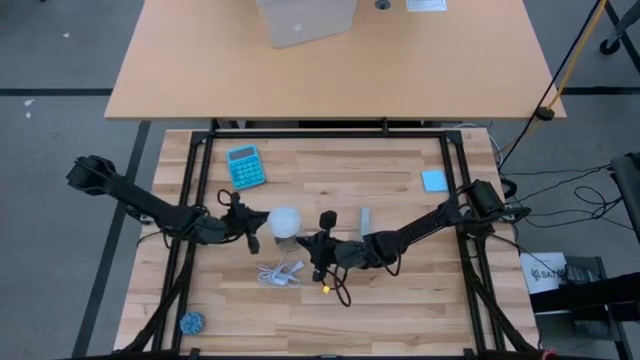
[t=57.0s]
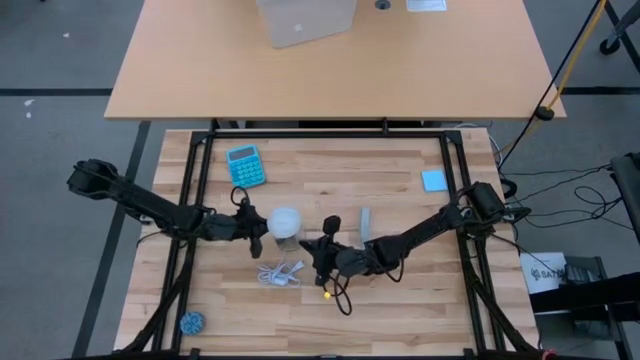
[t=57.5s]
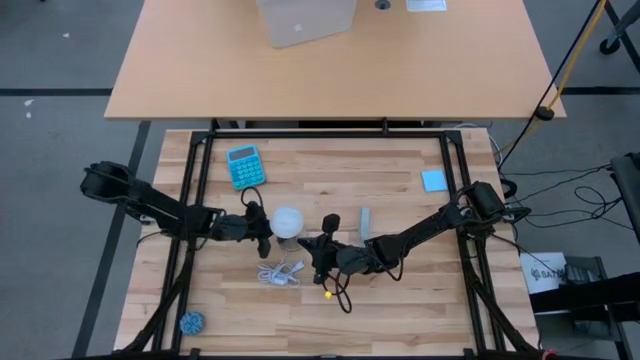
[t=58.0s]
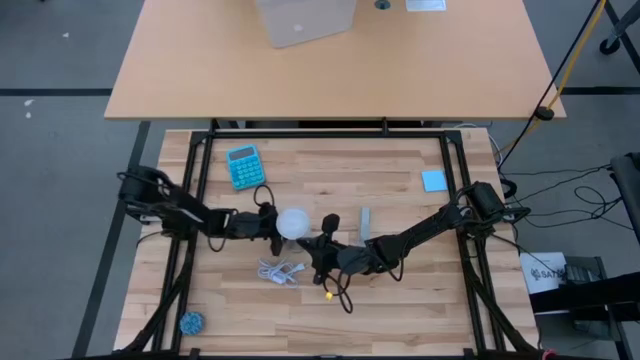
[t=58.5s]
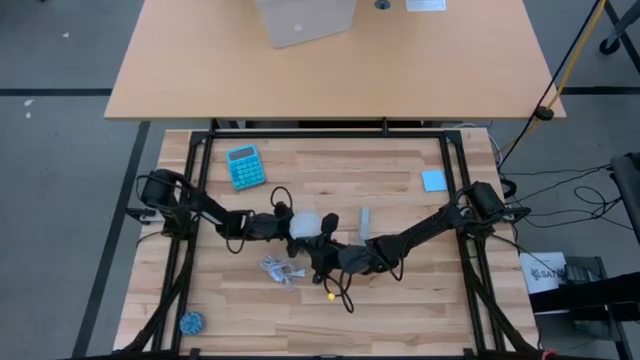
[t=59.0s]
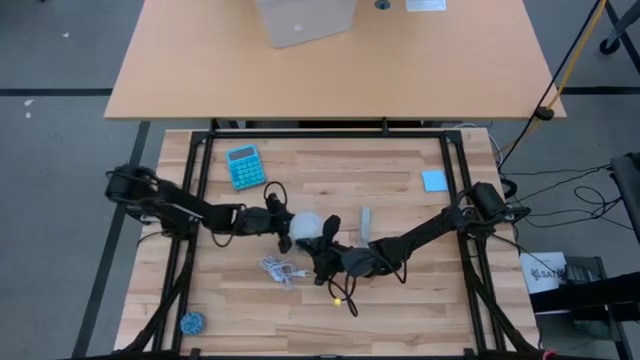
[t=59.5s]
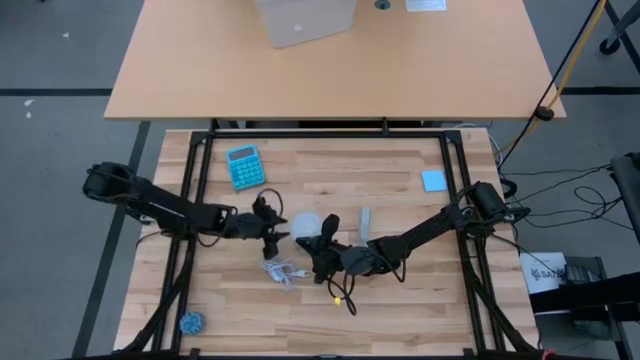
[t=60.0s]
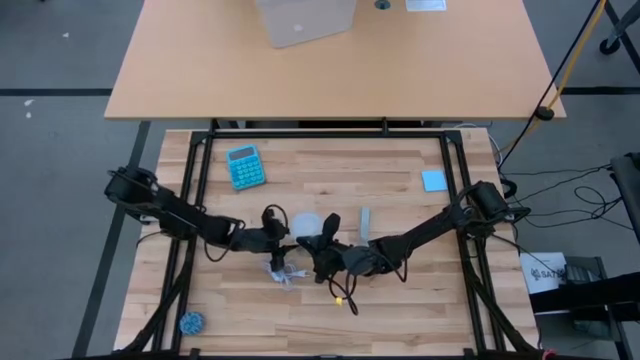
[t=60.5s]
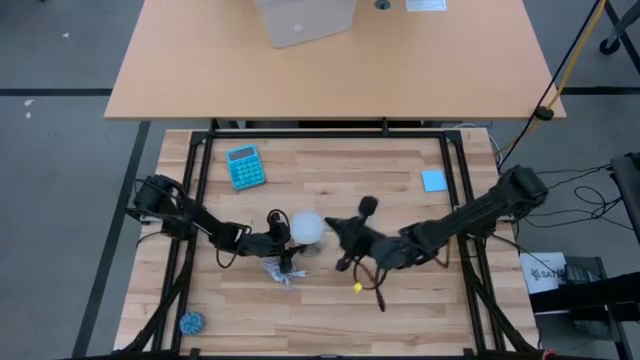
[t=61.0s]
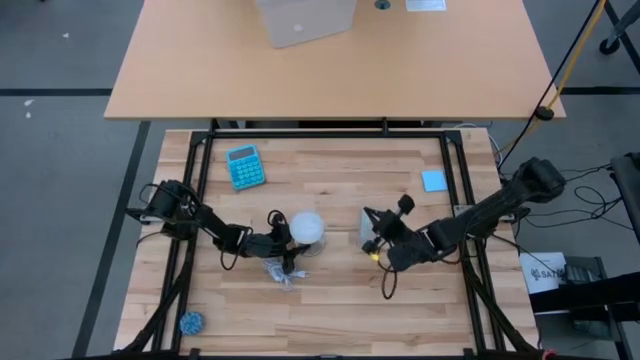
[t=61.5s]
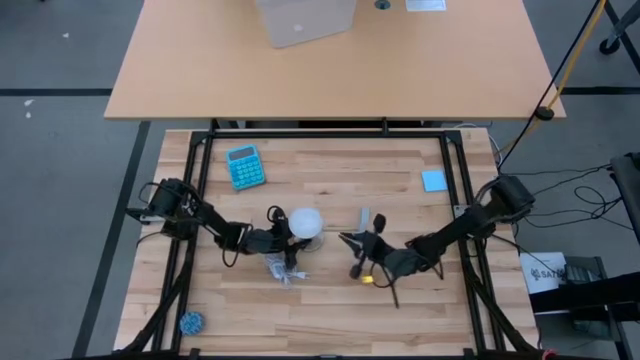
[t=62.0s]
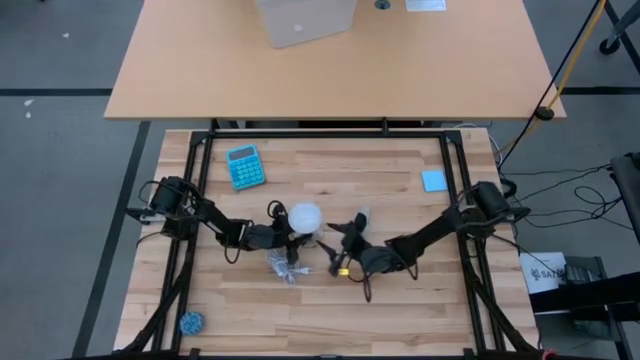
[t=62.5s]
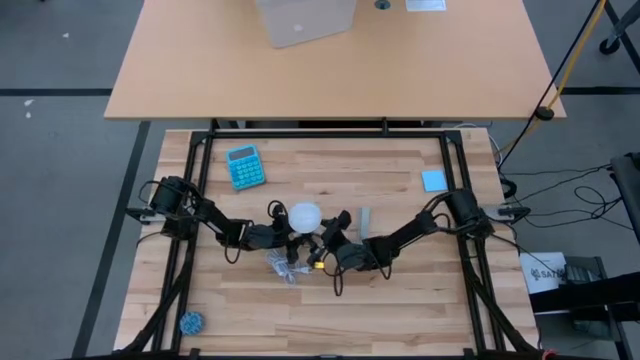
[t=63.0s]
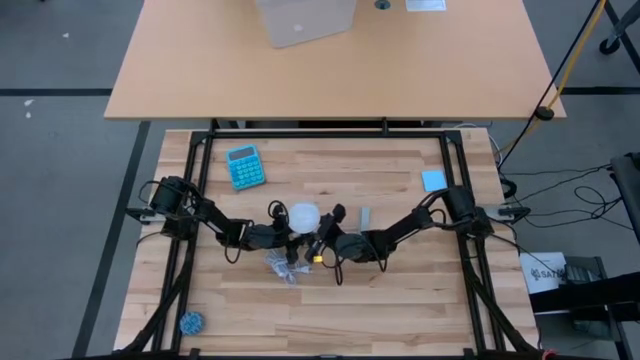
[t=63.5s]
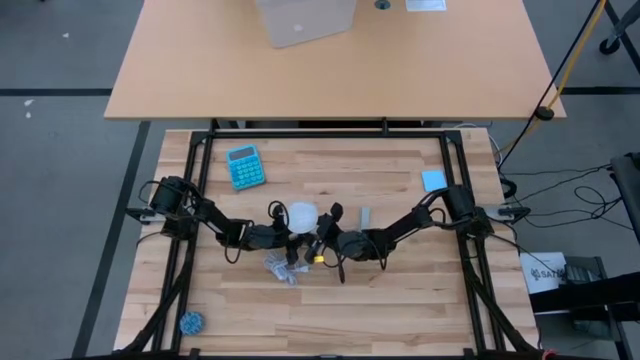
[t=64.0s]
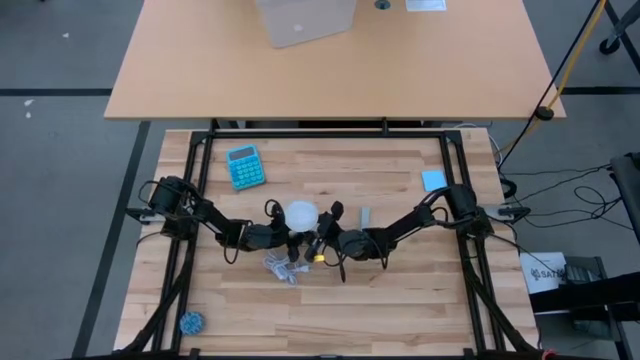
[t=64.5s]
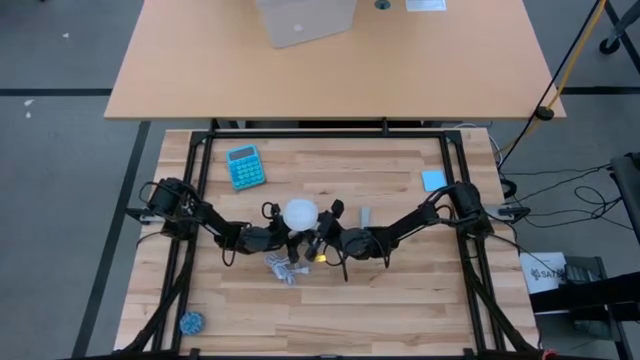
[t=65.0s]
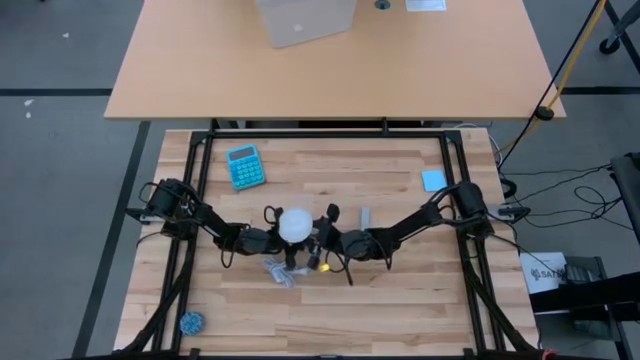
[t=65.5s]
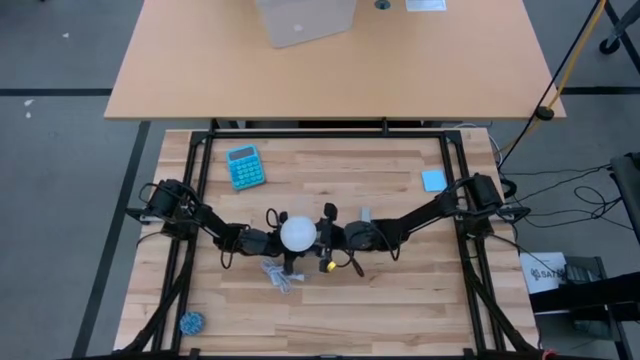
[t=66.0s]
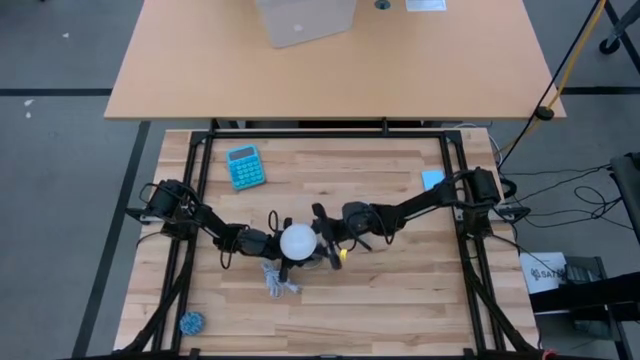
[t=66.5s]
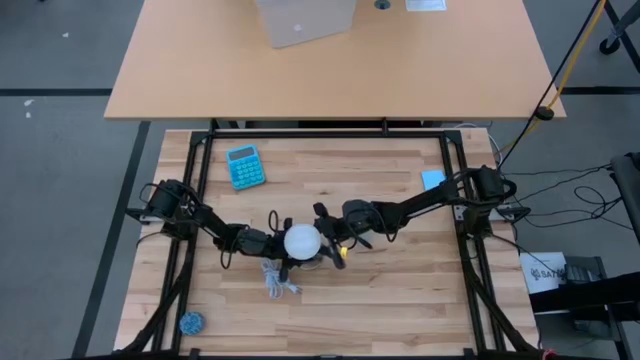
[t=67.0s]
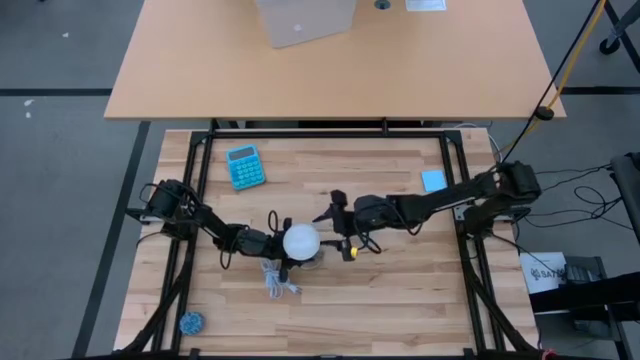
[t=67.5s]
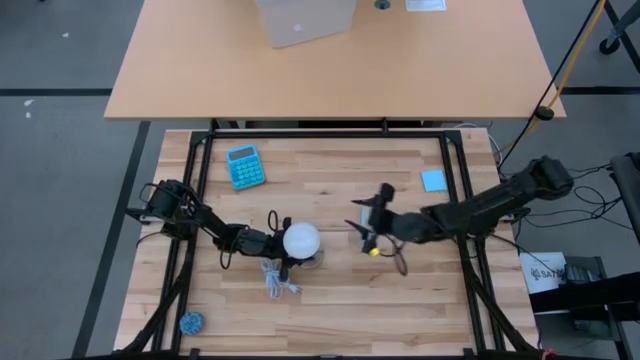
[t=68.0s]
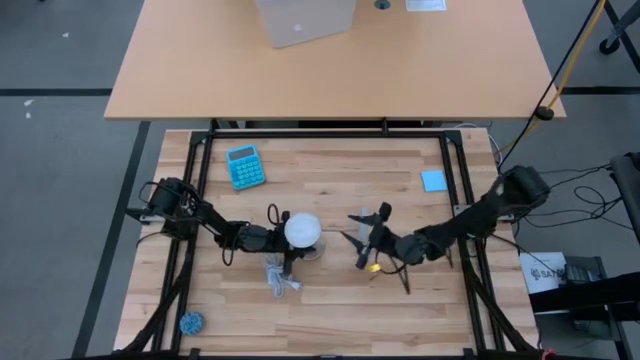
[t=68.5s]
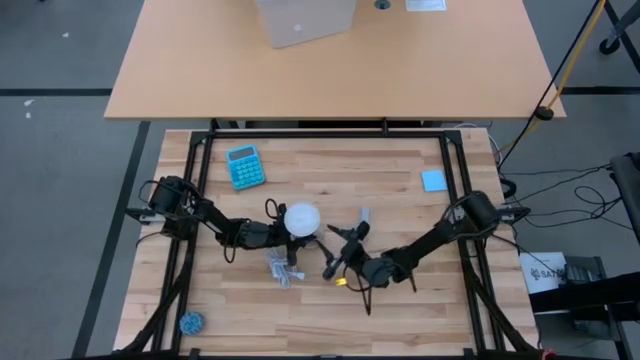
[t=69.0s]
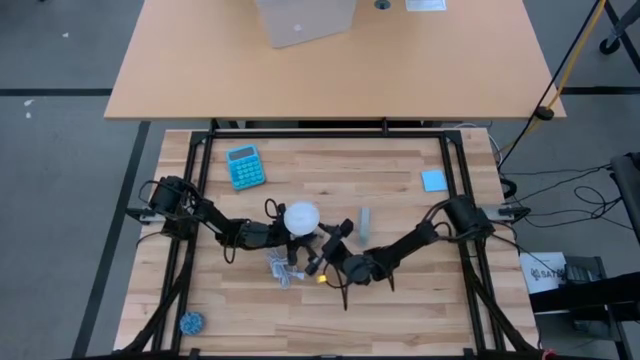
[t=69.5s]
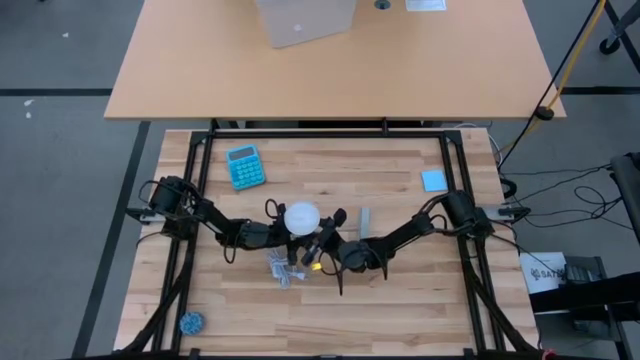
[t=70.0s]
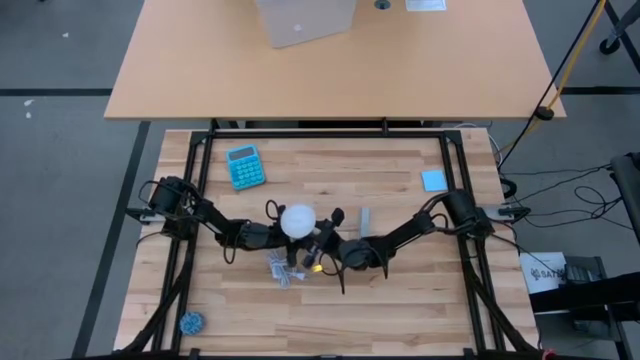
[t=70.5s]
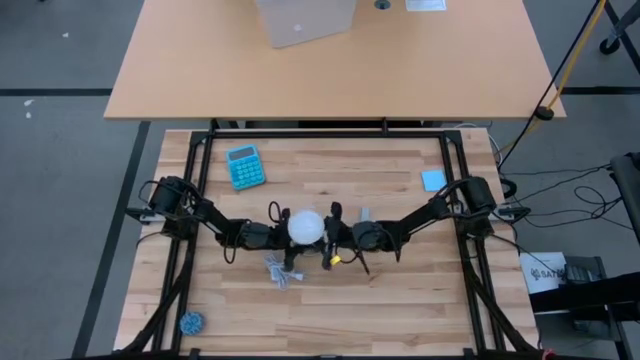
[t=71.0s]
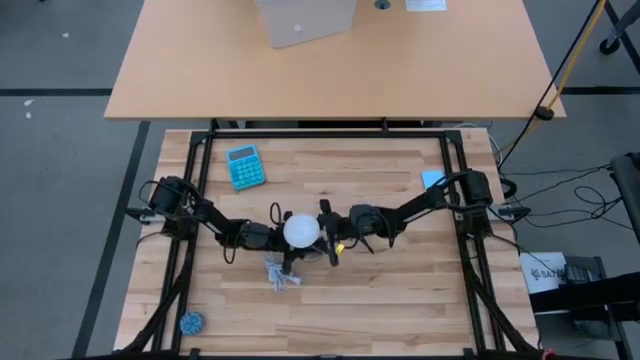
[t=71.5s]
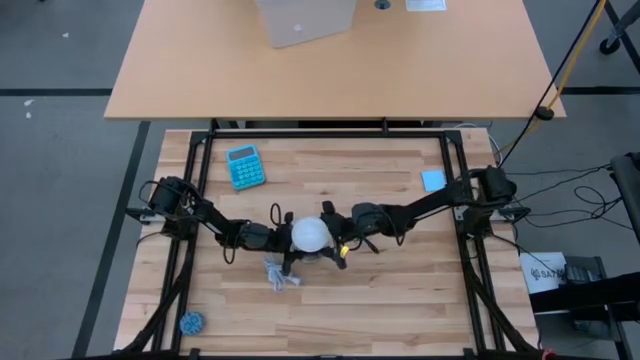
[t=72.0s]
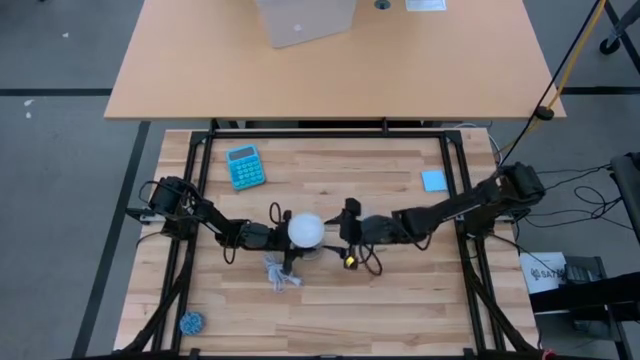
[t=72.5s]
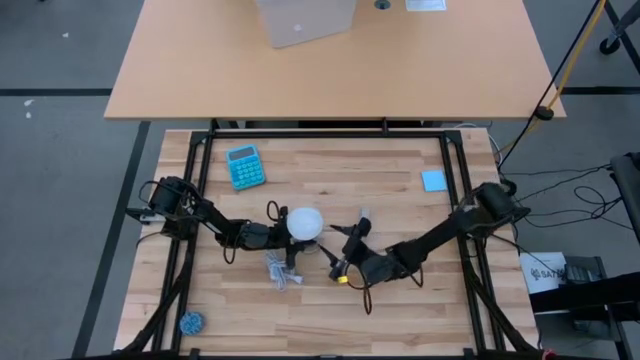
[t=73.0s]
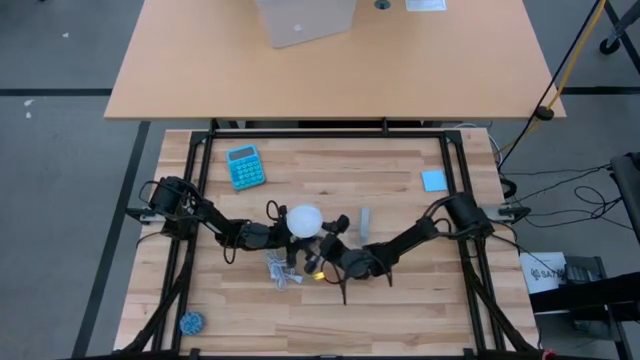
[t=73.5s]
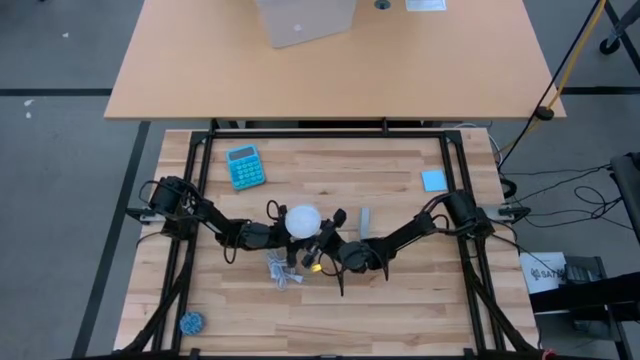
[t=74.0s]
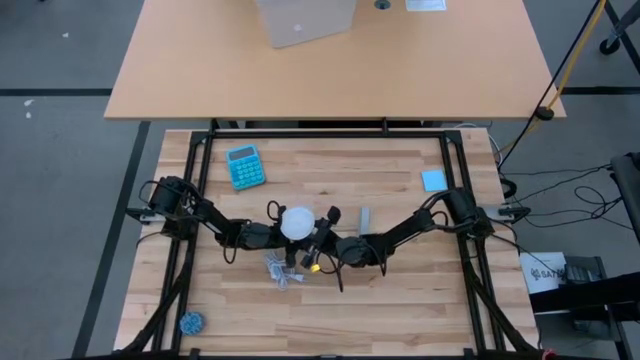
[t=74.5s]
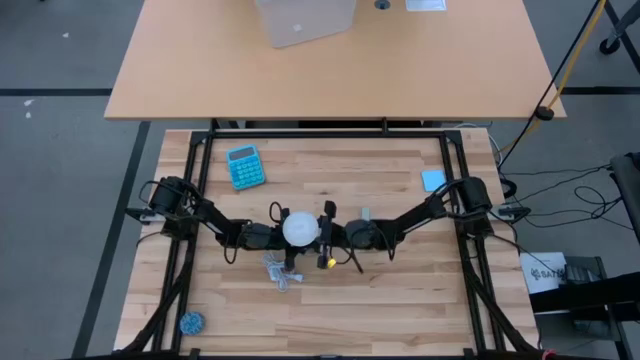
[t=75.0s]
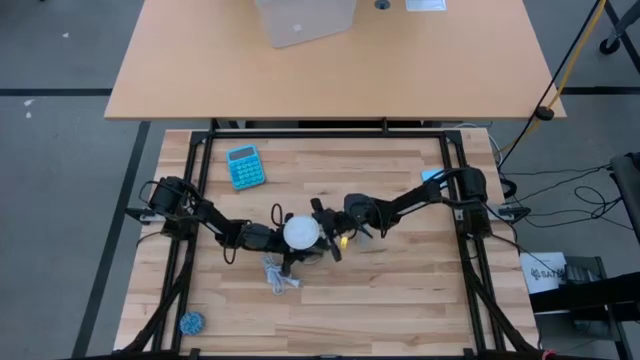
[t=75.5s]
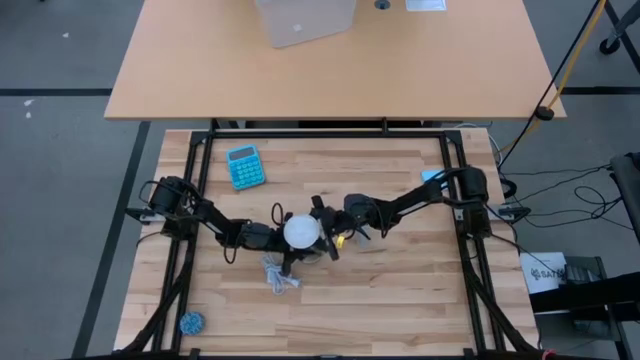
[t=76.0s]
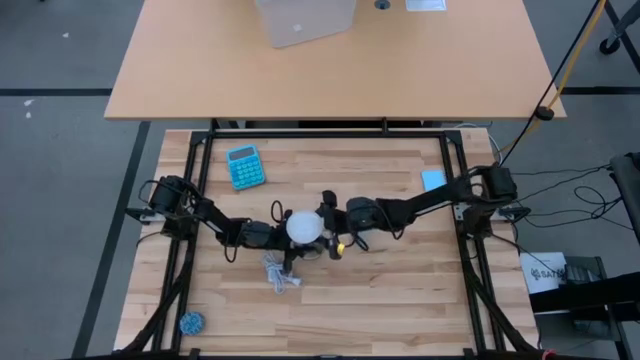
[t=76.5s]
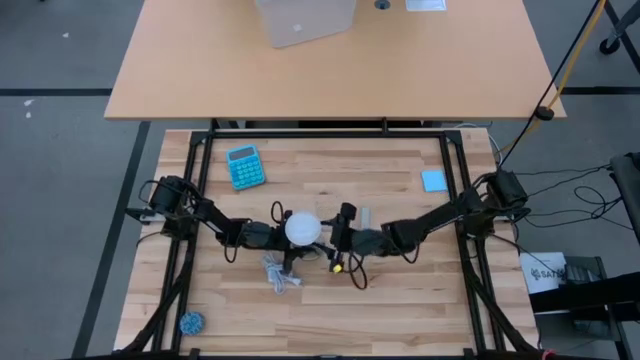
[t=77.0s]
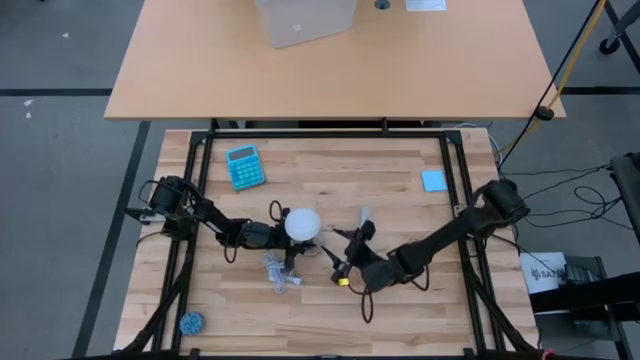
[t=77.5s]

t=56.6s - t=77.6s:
Task: Screw lightbulb
Remove the light bulb from the lamp
